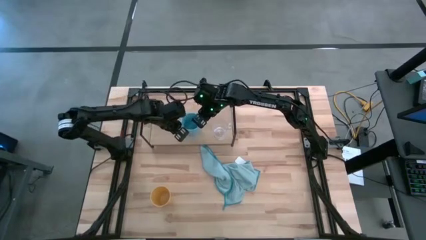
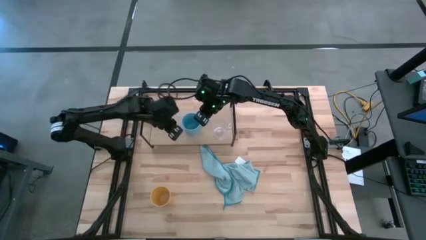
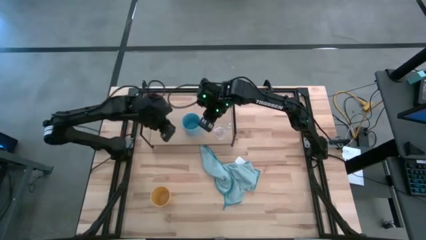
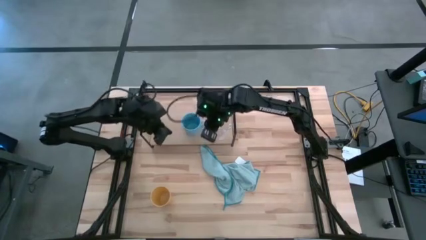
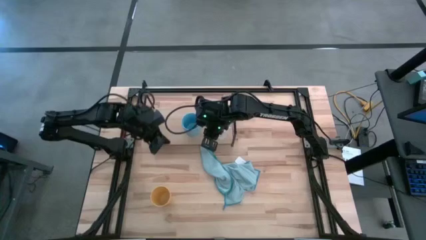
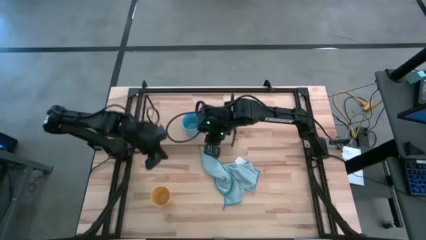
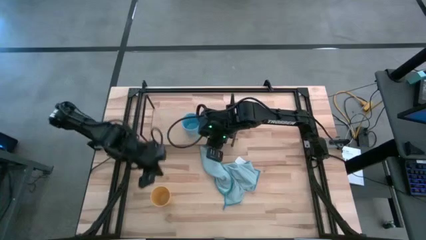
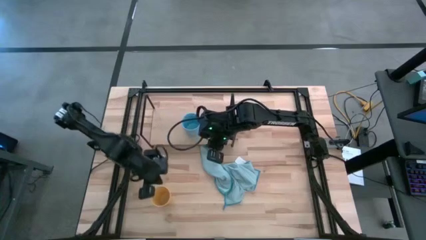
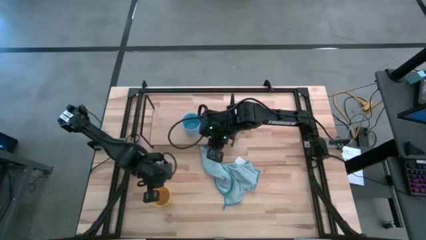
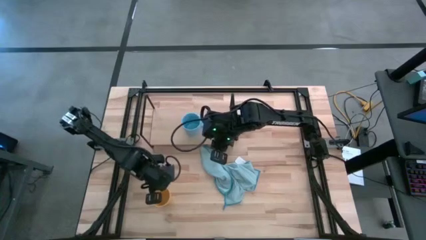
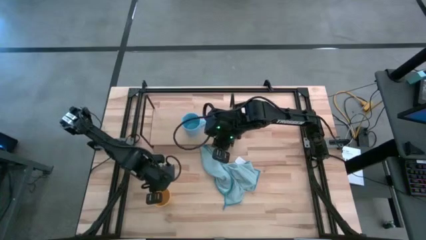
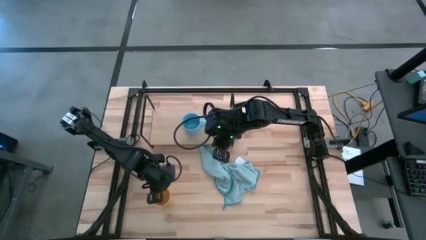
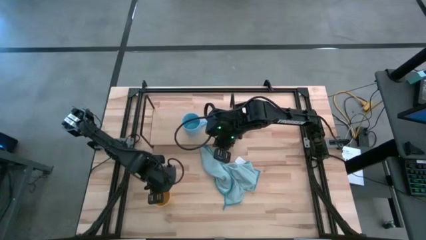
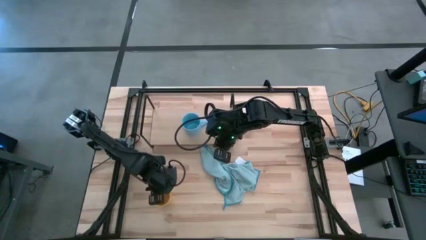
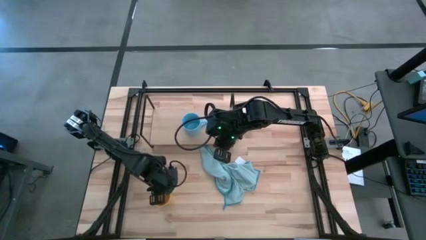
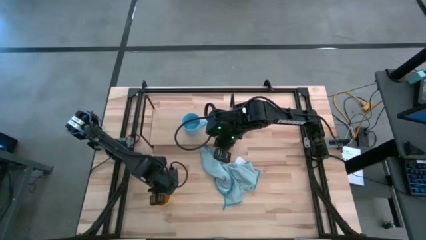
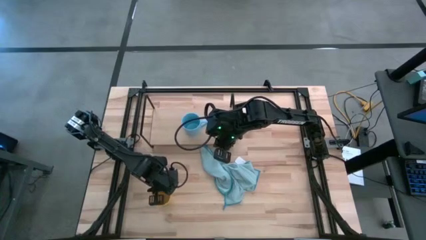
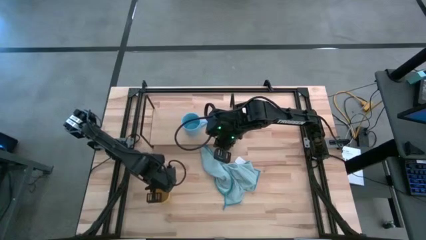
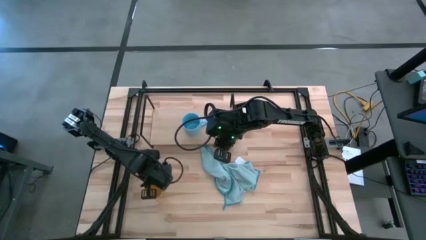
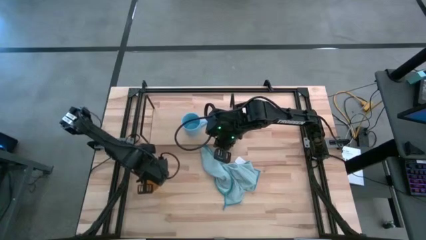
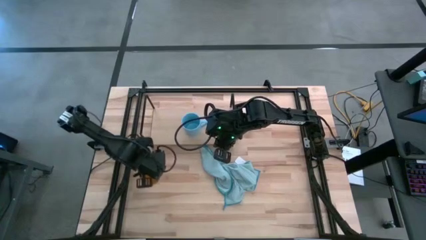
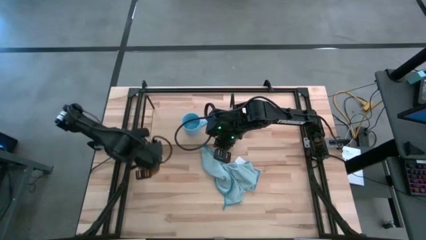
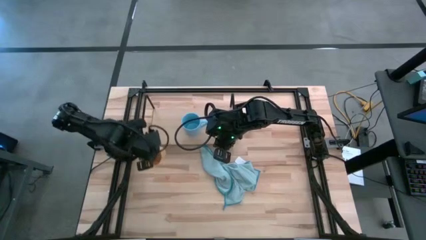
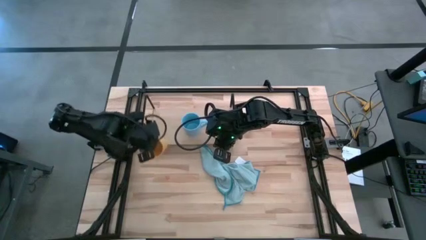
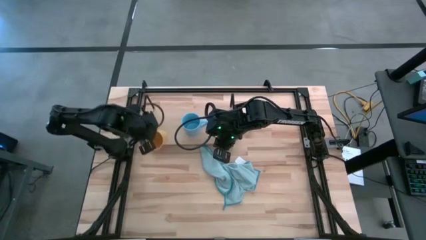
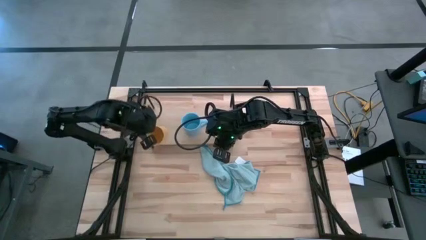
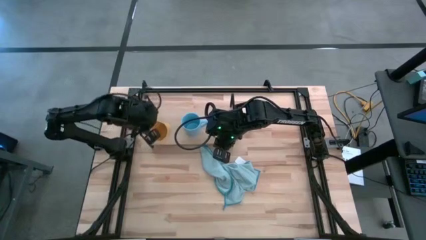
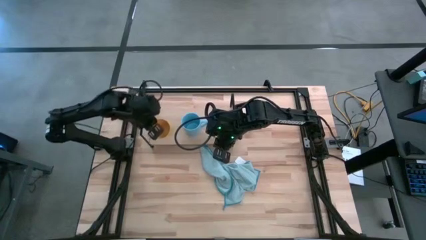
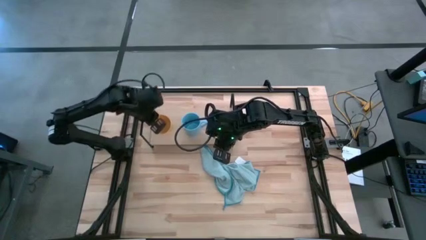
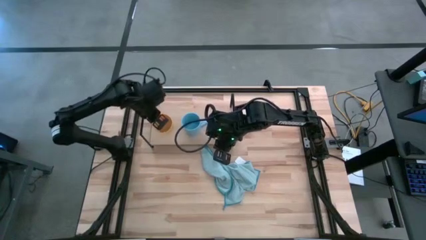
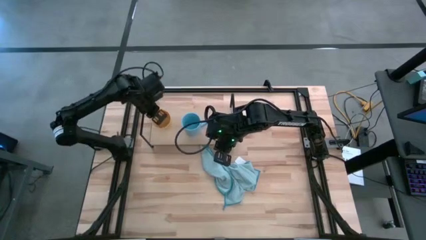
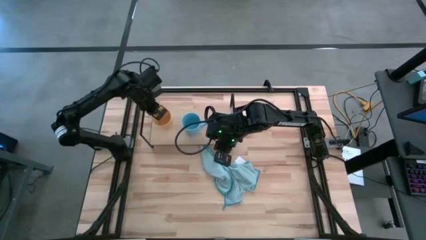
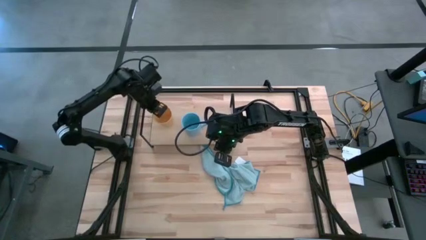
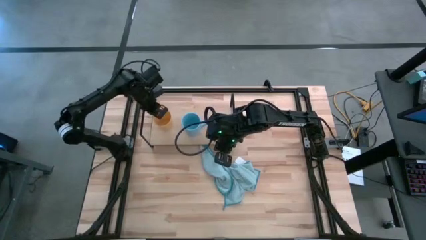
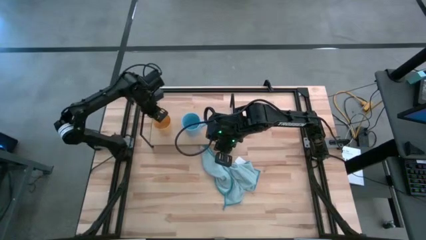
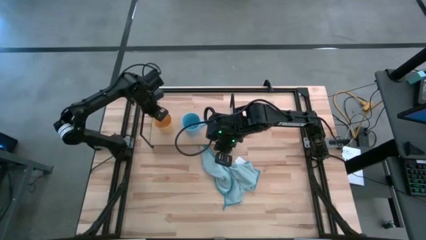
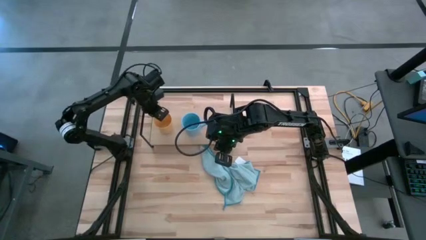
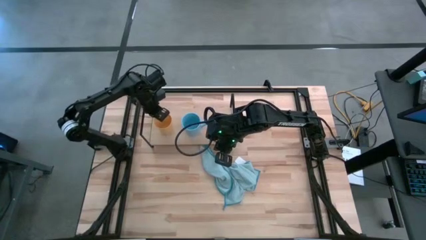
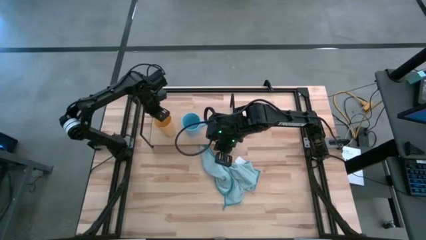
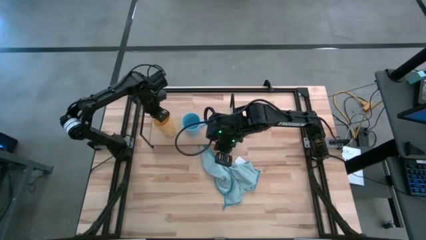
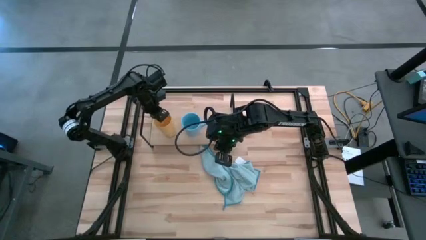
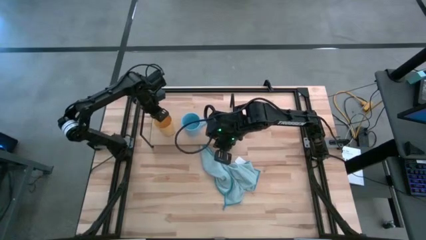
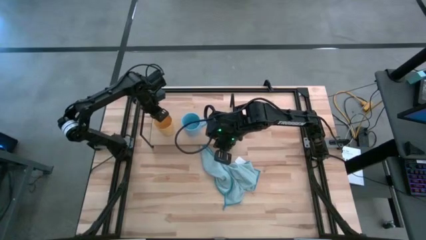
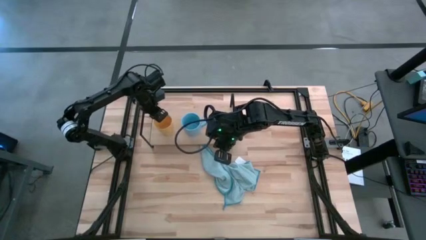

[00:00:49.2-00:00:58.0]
Task: Stack small to large cups/mugs on shelf
Put the yellow cup on the shelf

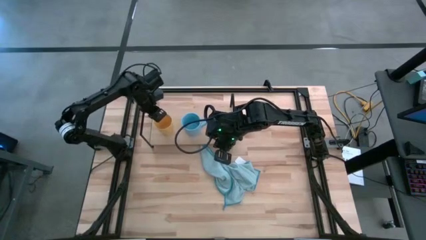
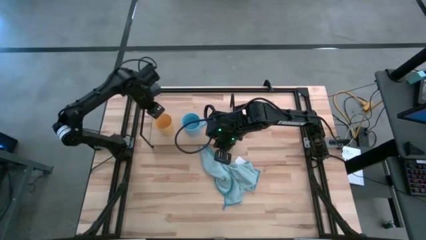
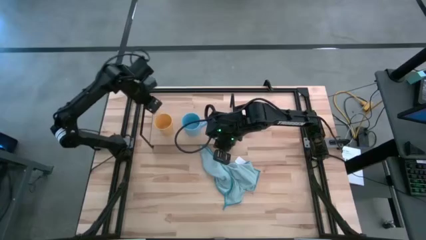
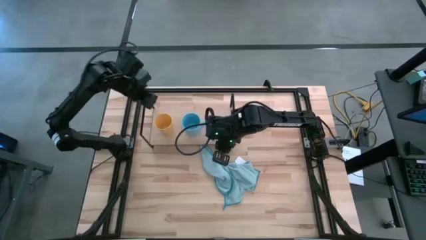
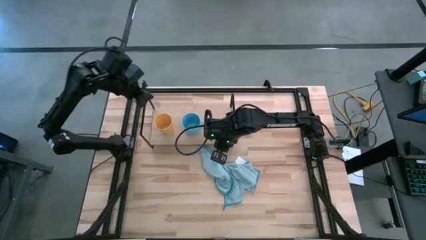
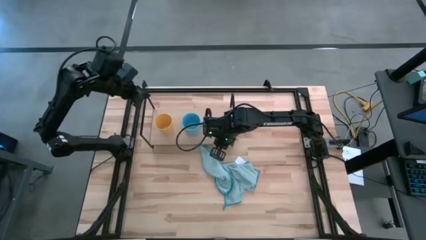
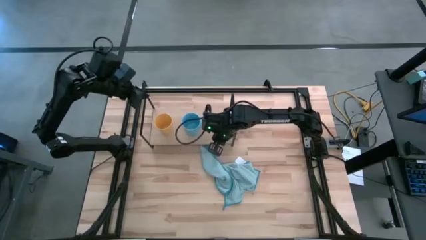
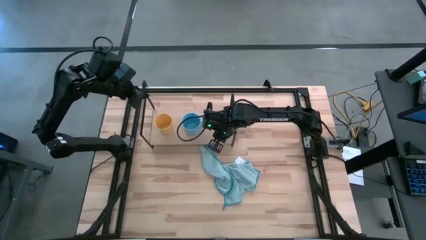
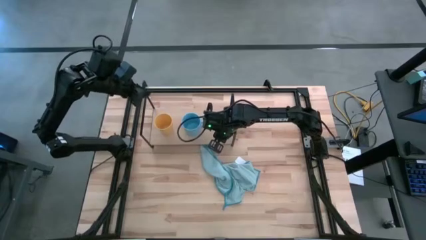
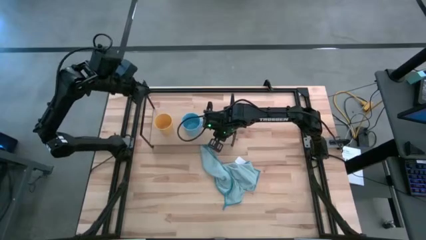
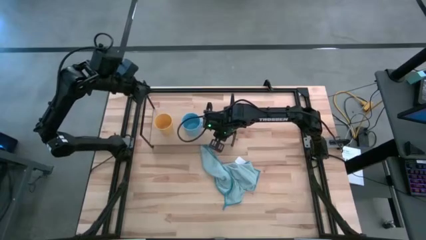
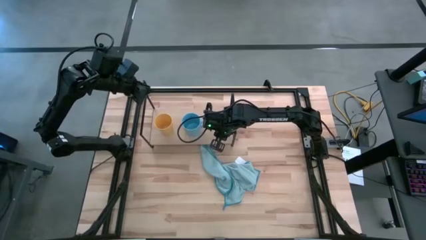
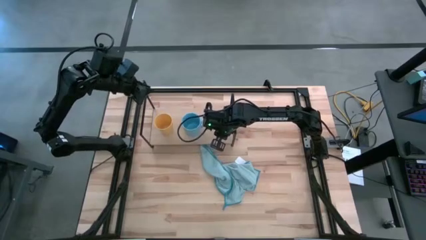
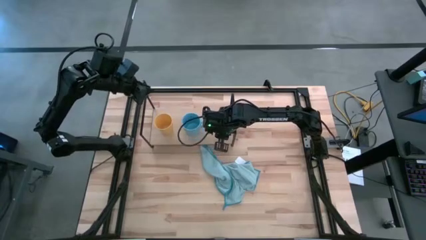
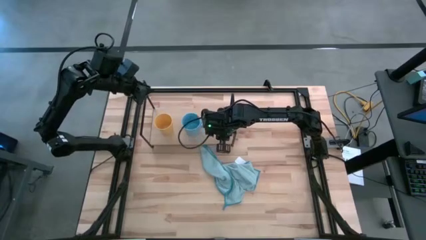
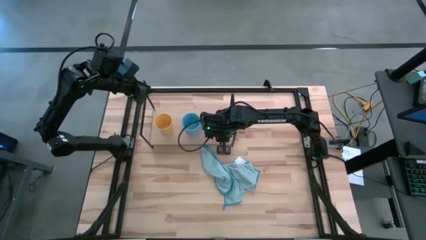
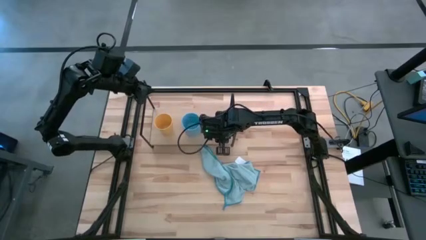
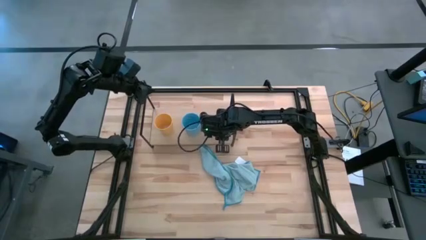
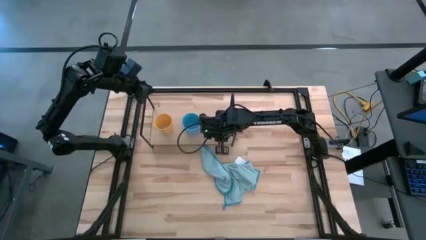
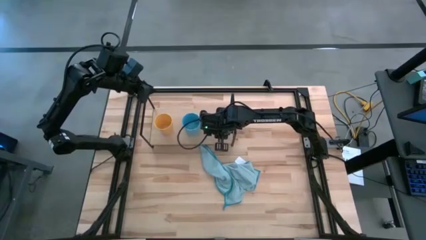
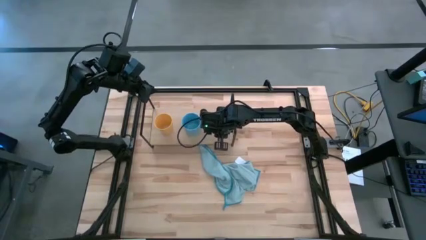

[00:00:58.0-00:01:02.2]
Adjust the transparent cup
